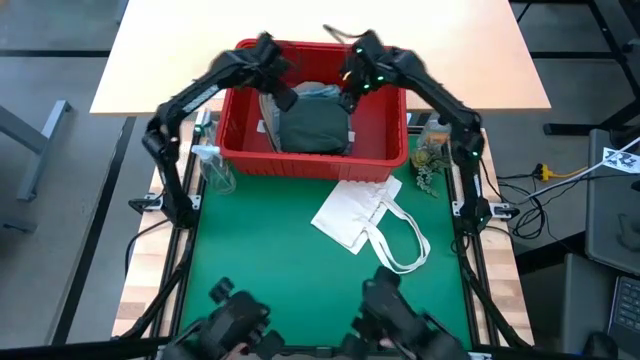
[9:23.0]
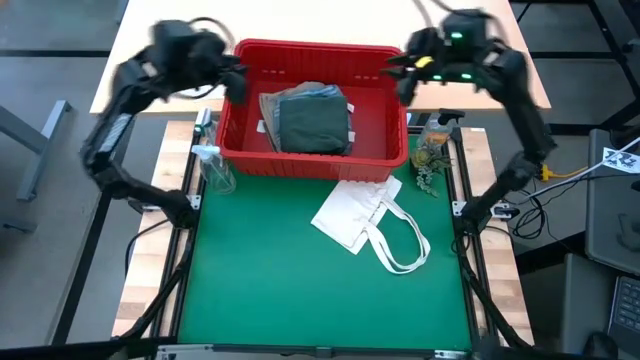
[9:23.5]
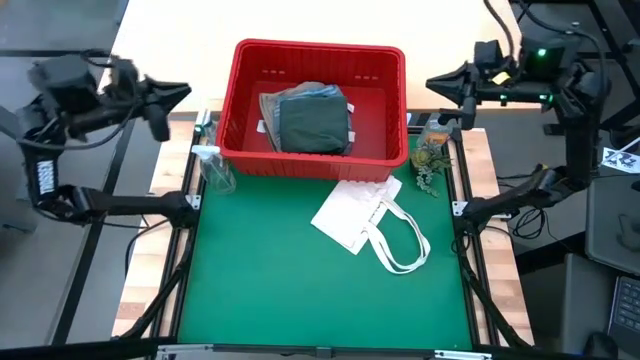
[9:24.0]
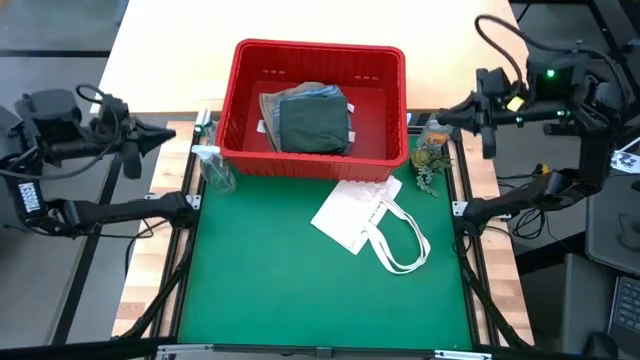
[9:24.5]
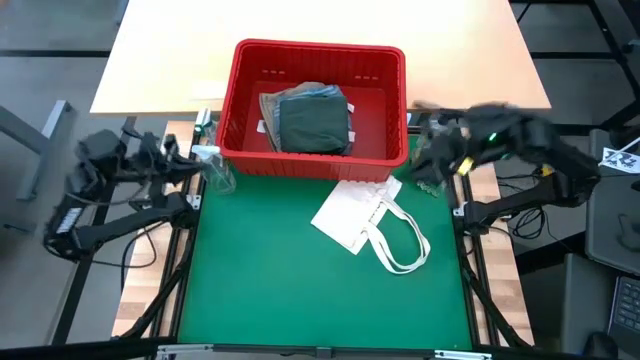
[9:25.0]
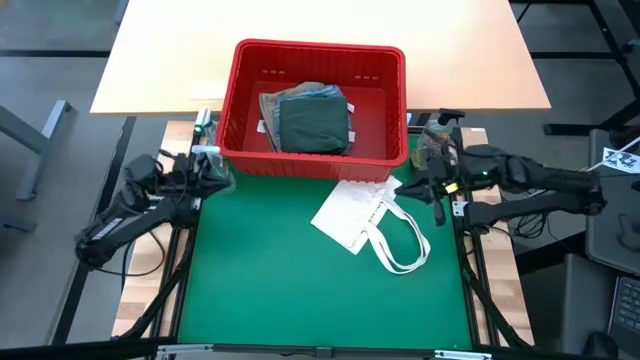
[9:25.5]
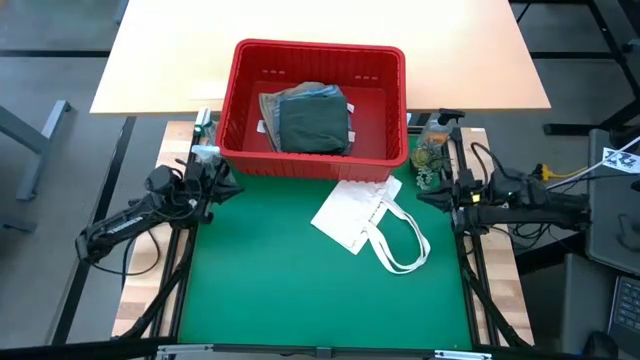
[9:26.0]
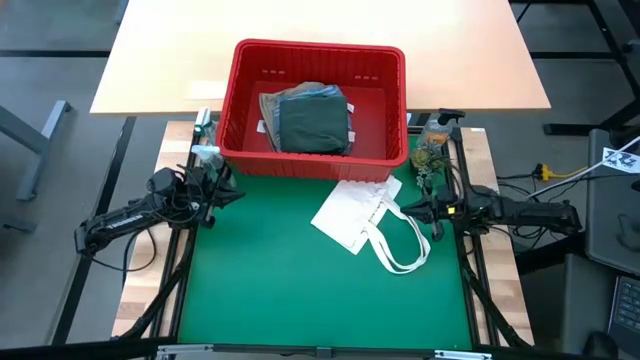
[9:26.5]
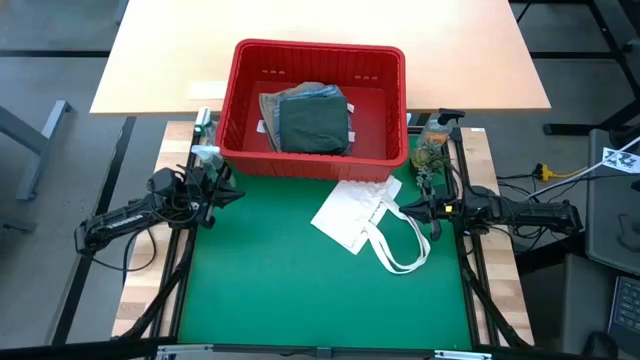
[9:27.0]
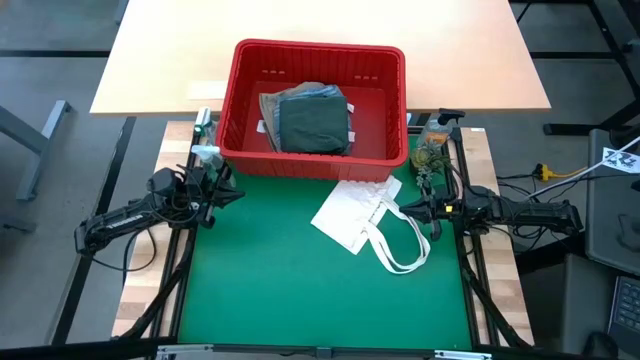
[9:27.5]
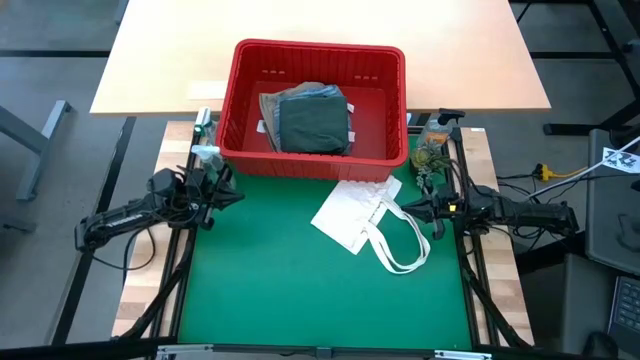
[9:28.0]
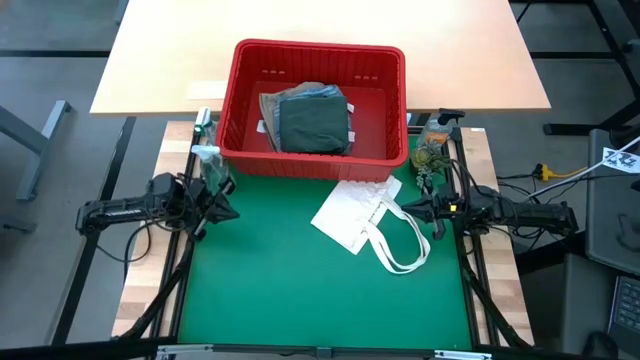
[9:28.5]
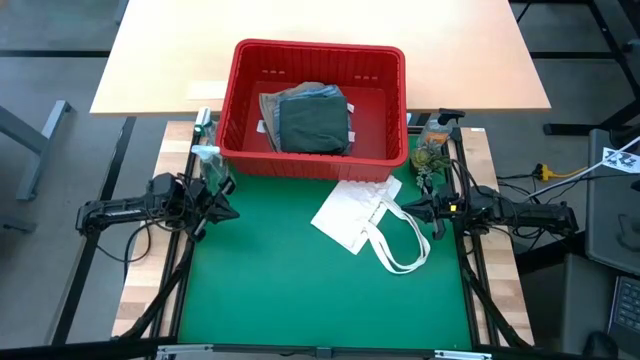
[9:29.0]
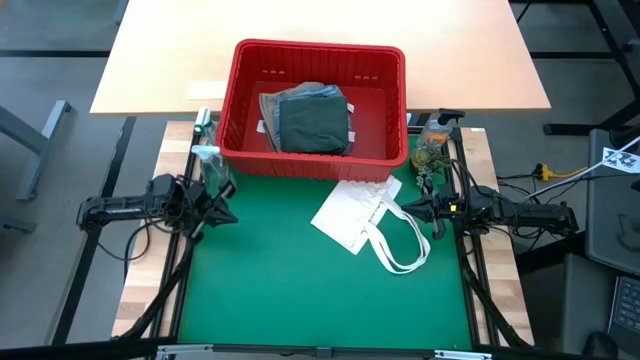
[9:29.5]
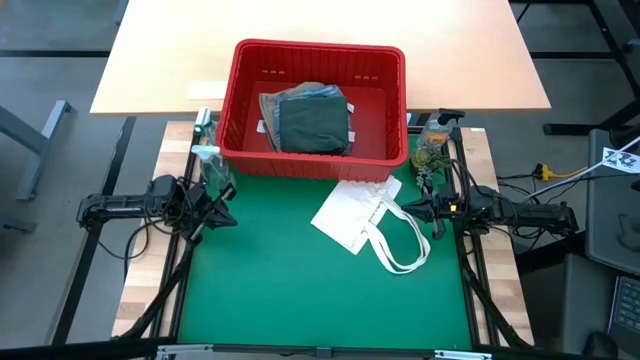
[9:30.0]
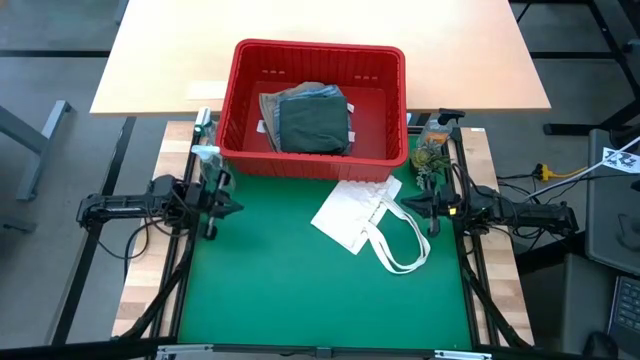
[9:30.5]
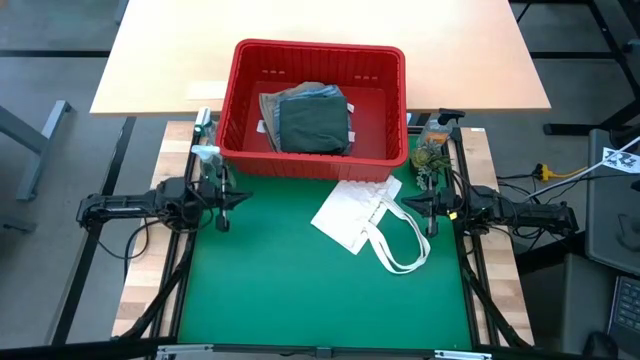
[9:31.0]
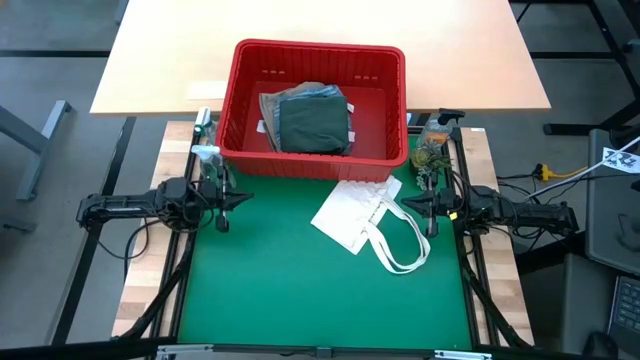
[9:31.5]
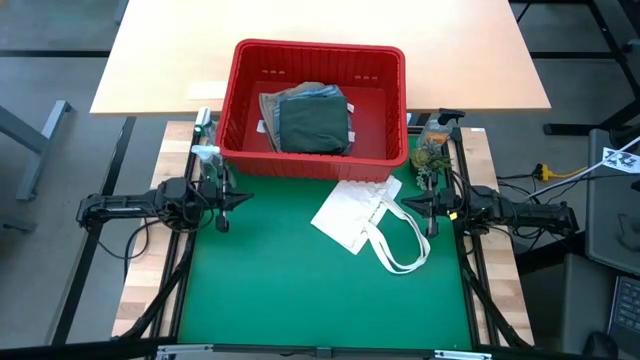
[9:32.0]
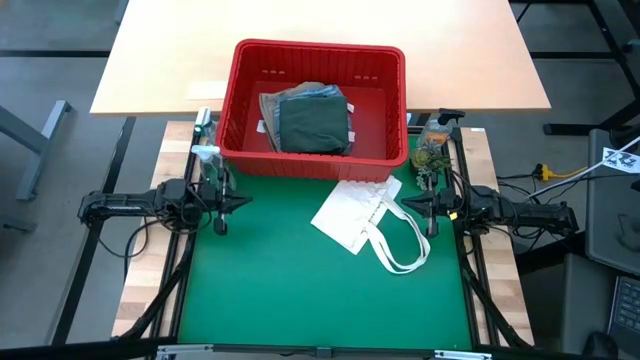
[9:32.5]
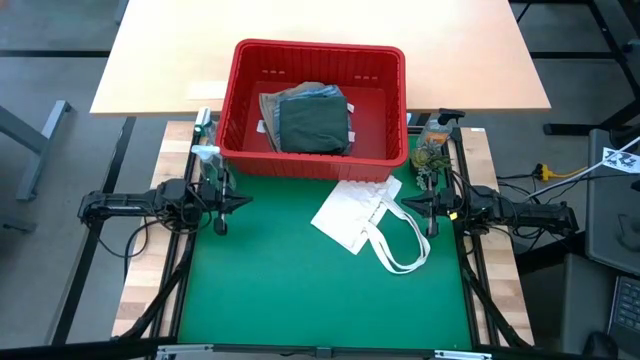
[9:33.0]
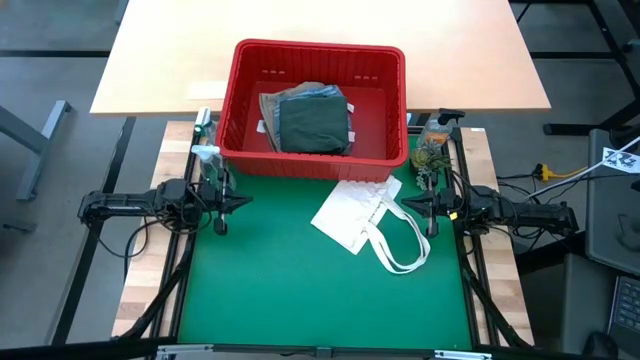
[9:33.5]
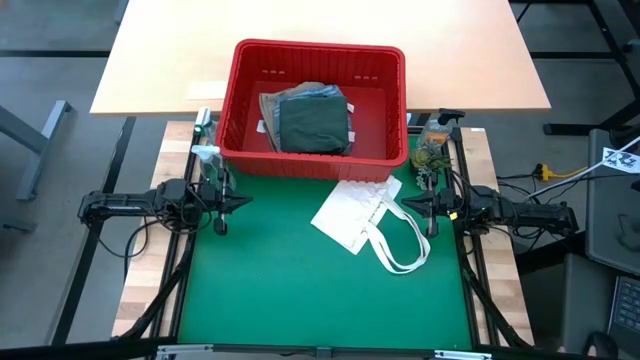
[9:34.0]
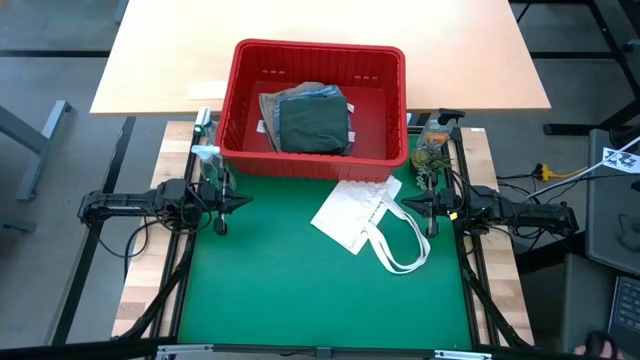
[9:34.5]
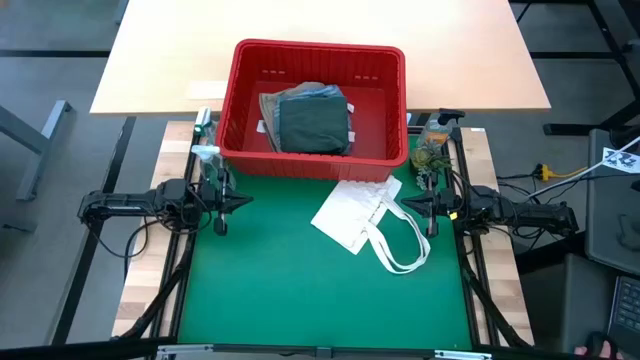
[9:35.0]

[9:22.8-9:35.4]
Task: Fold Laundry from Bin
Return to Home Position

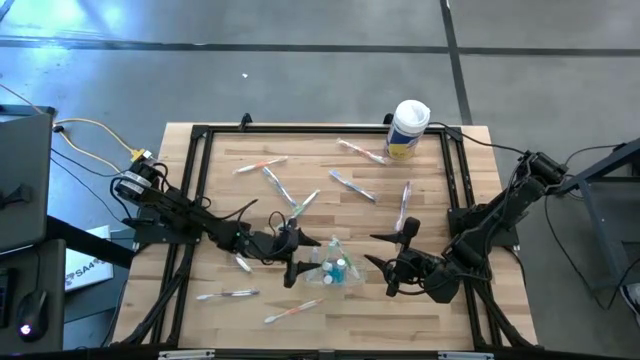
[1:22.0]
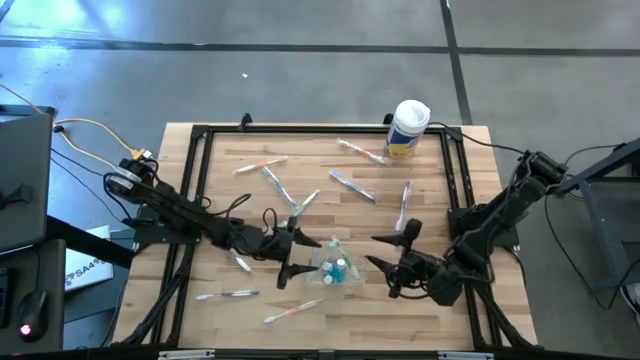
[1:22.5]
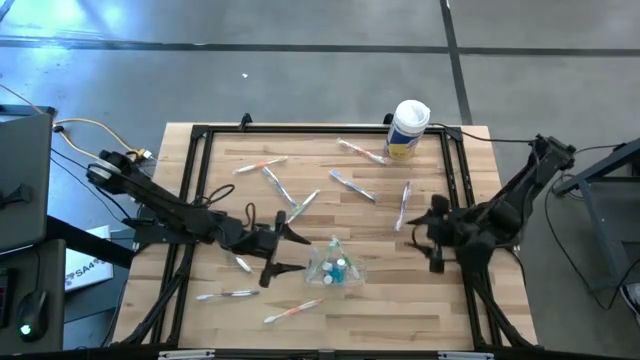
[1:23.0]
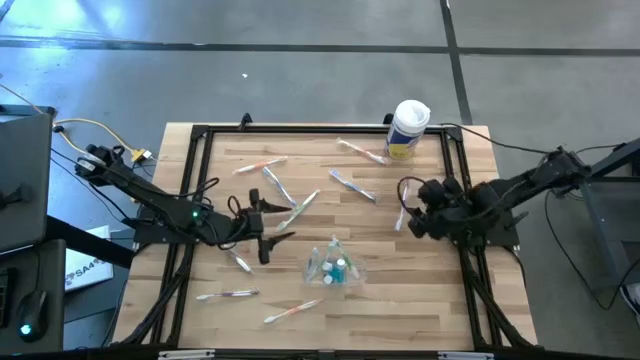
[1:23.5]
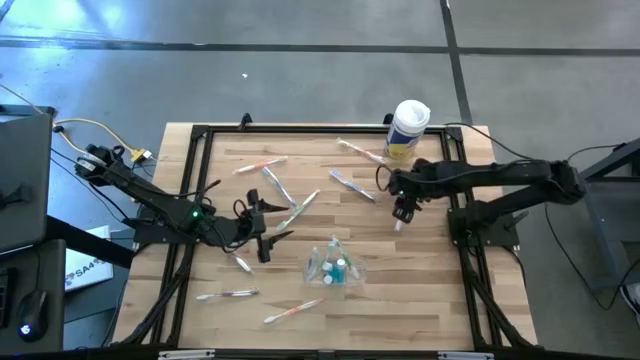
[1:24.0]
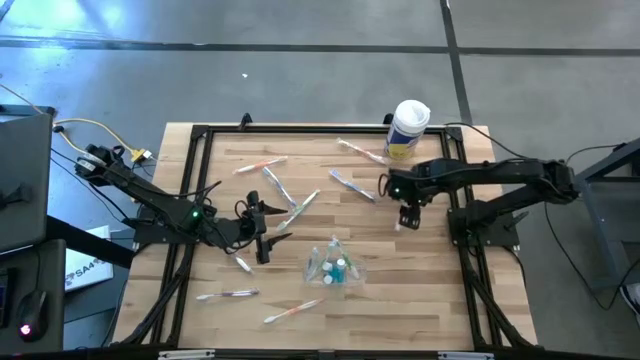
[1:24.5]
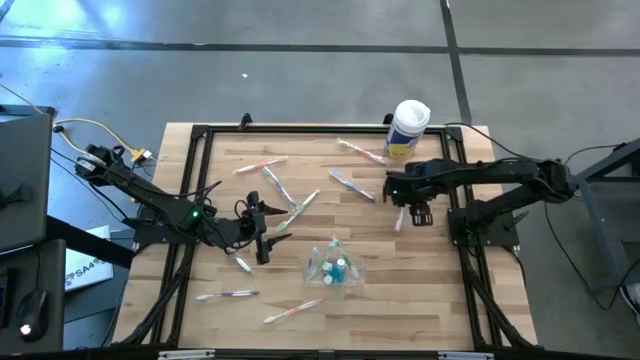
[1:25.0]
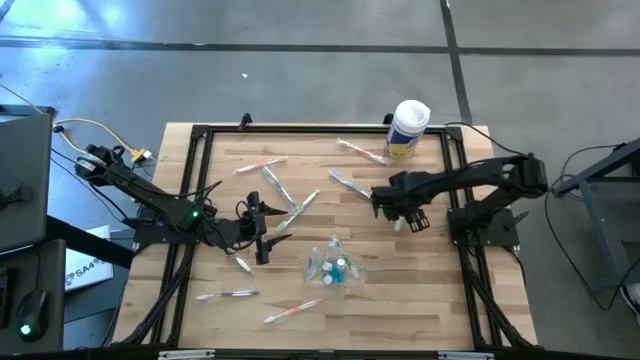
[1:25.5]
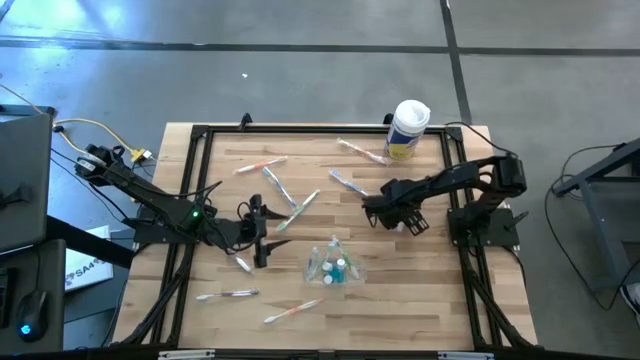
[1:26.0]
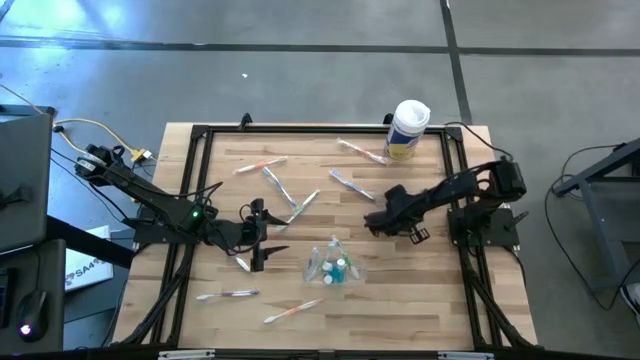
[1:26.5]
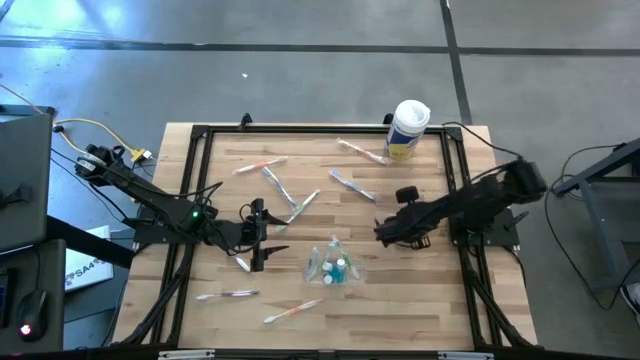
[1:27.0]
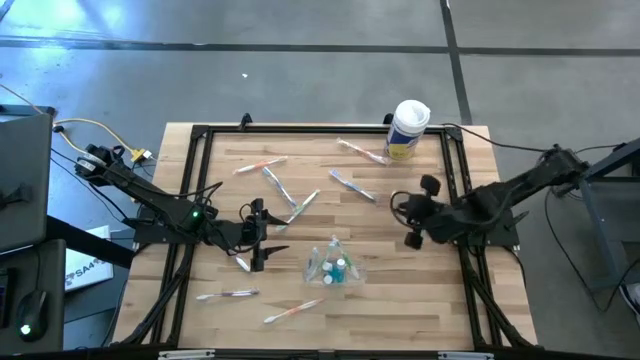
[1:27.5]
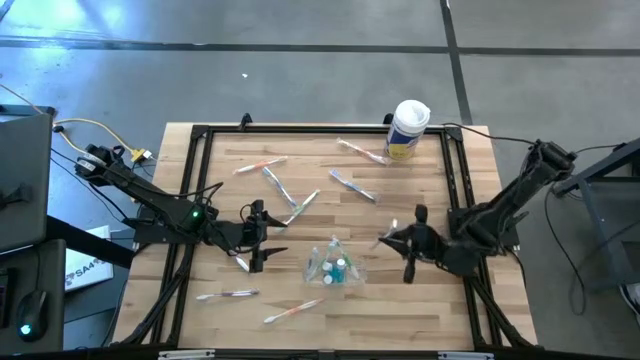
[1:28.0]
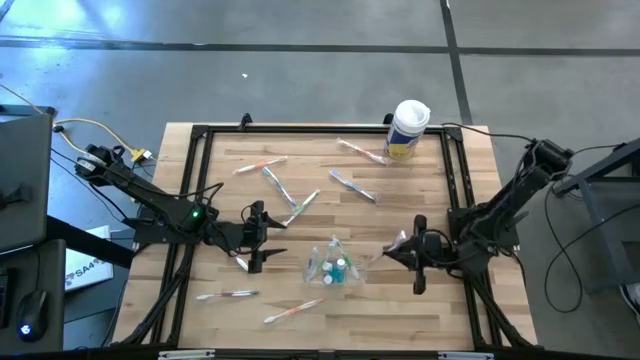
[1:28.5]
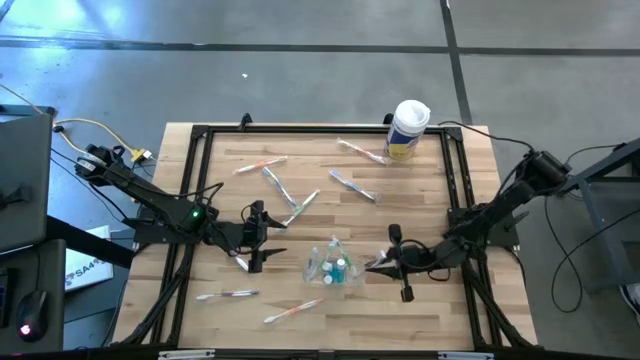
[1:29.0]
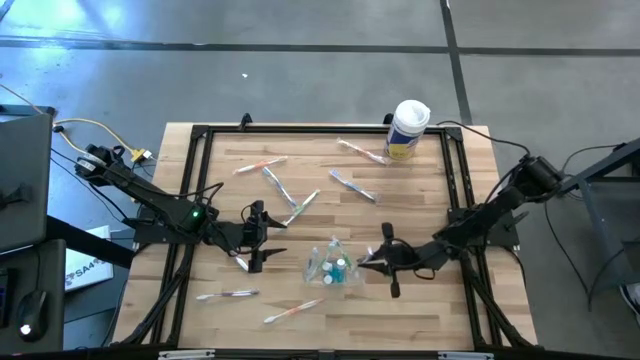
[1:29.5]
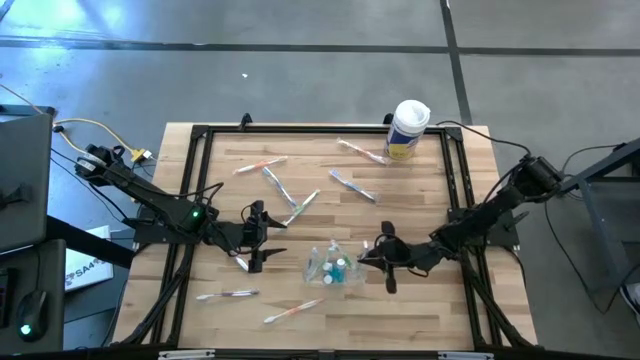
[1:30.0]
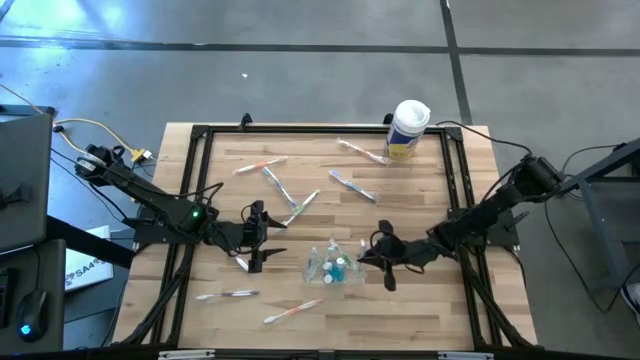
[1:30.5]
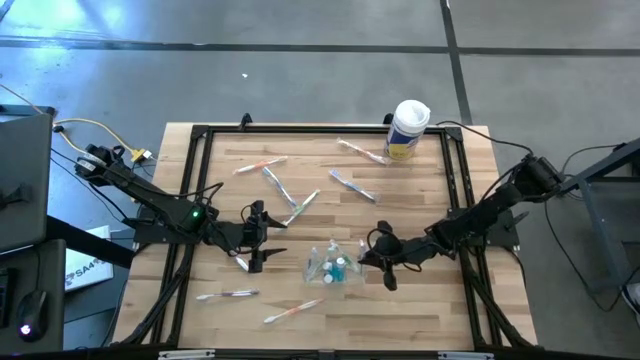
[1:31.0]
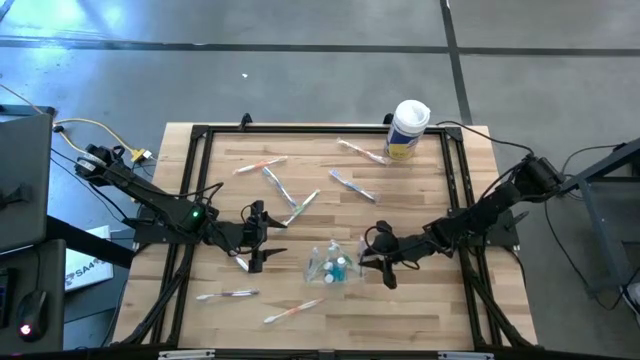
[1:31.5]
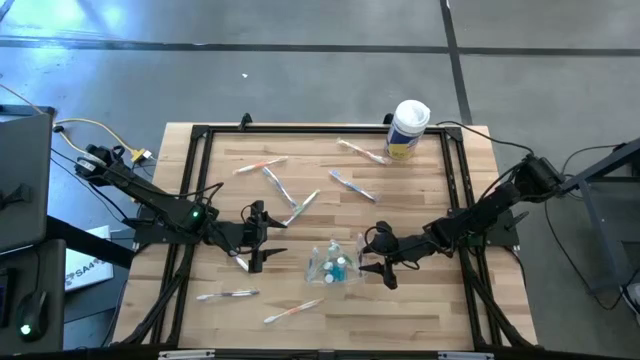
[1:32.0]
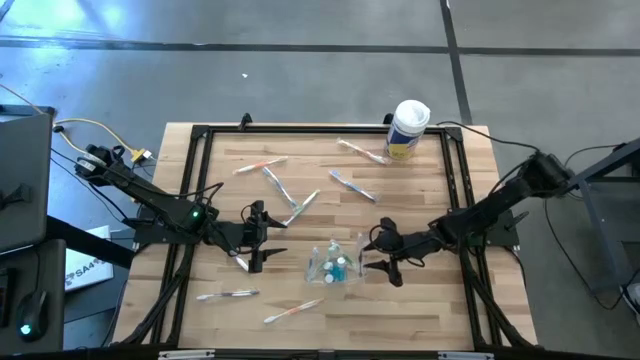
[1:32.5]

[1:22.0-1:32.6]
Task: Pick & Place toothbrushing station
Put the top purple toothbrush into the transparent organizer
